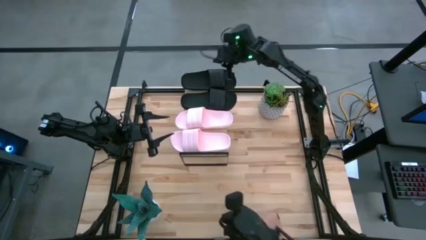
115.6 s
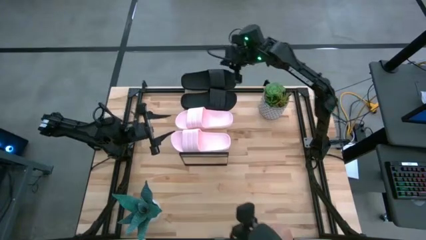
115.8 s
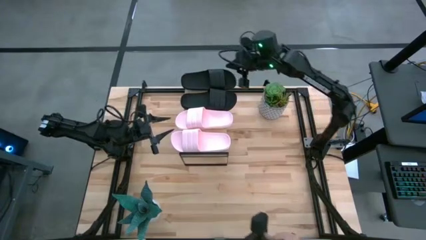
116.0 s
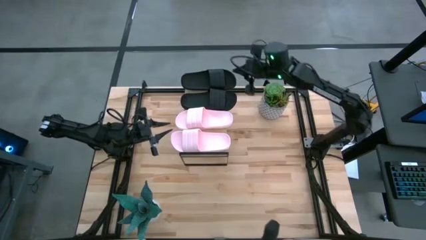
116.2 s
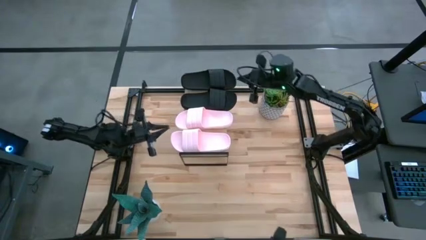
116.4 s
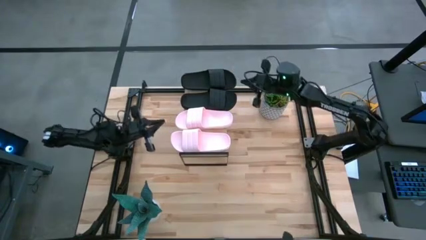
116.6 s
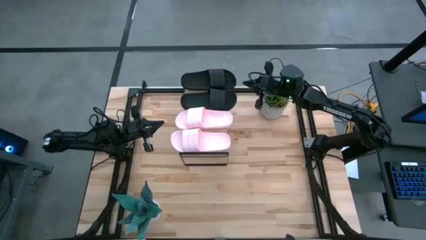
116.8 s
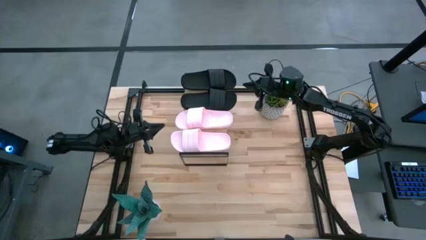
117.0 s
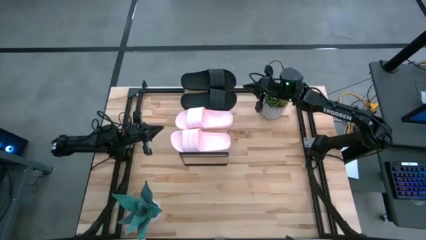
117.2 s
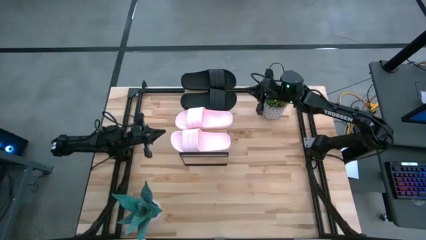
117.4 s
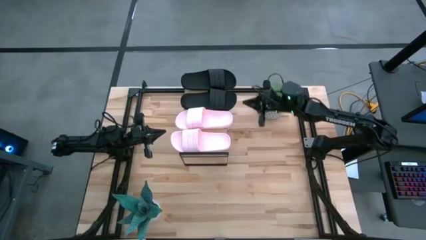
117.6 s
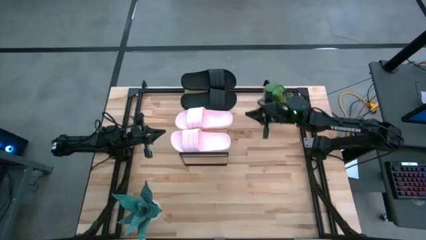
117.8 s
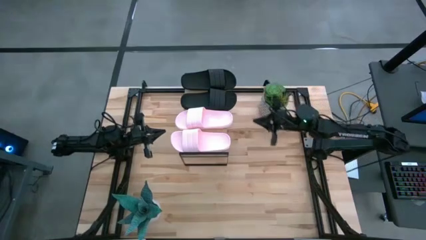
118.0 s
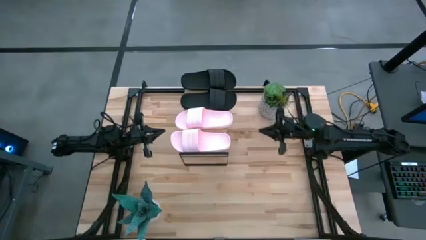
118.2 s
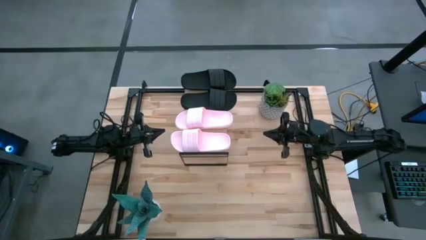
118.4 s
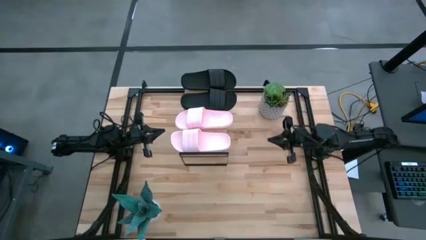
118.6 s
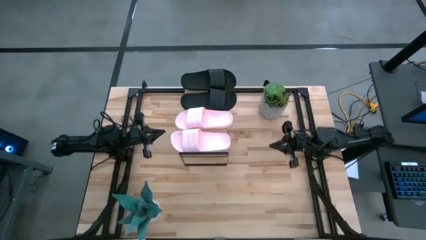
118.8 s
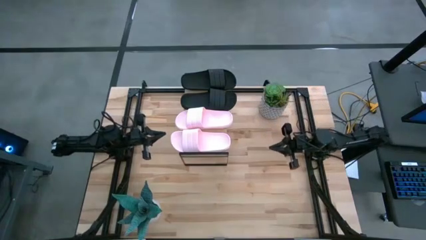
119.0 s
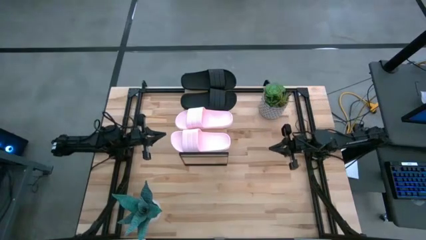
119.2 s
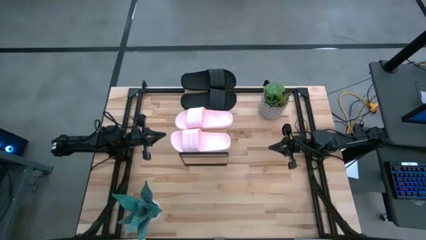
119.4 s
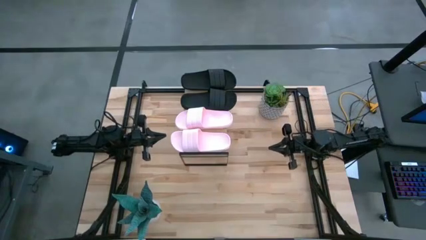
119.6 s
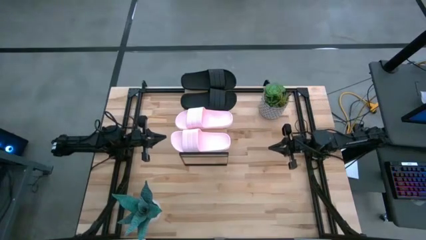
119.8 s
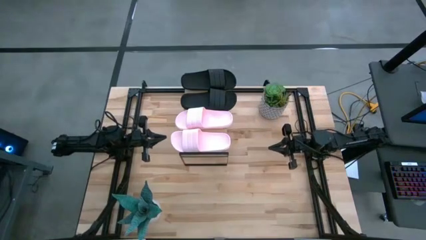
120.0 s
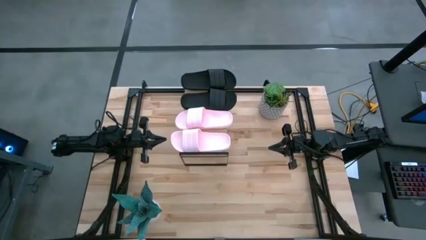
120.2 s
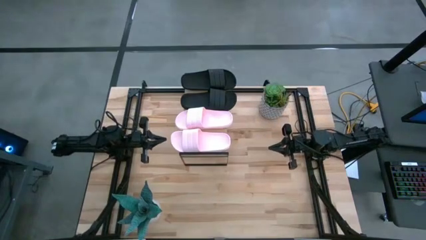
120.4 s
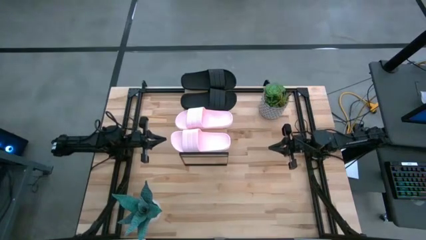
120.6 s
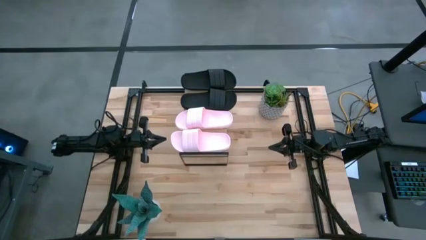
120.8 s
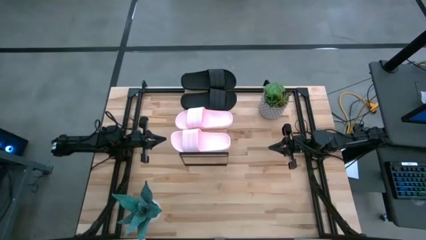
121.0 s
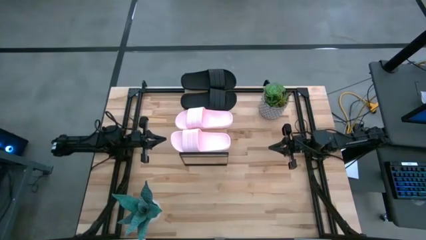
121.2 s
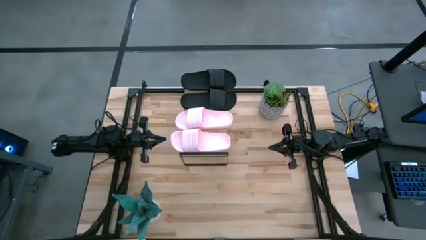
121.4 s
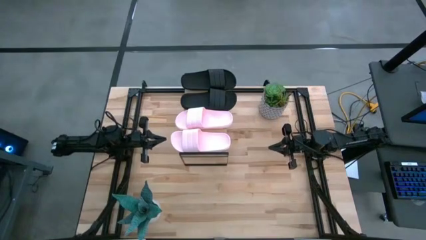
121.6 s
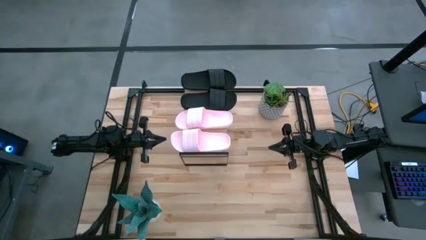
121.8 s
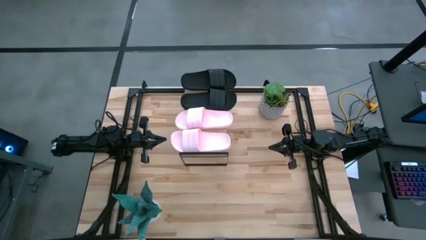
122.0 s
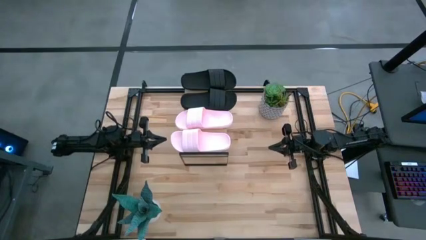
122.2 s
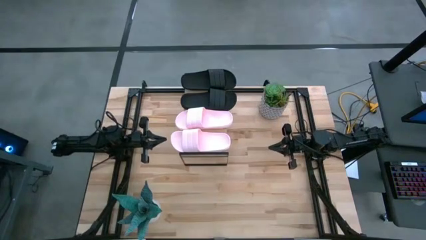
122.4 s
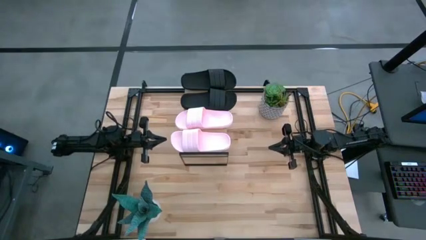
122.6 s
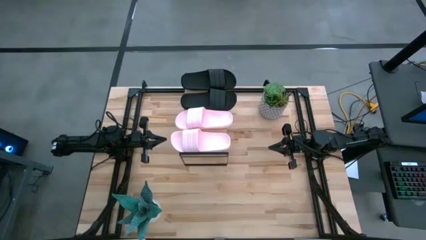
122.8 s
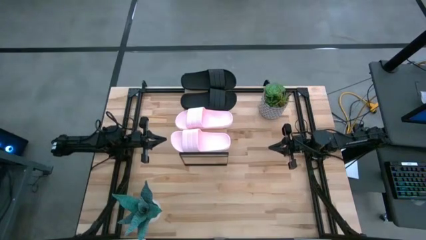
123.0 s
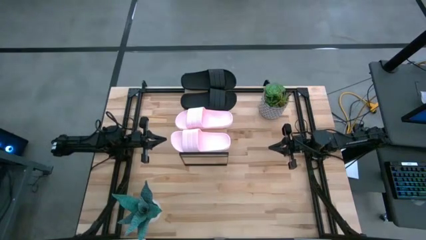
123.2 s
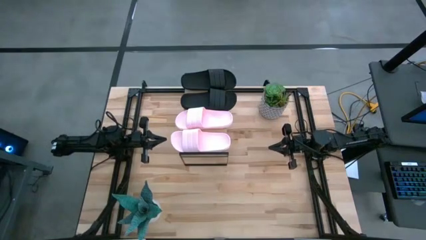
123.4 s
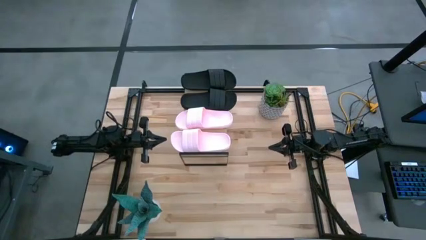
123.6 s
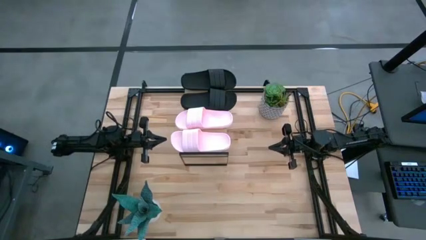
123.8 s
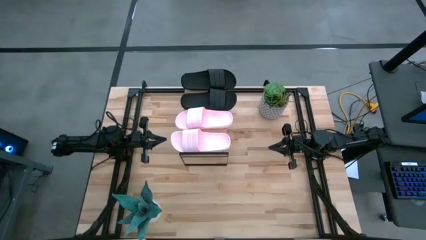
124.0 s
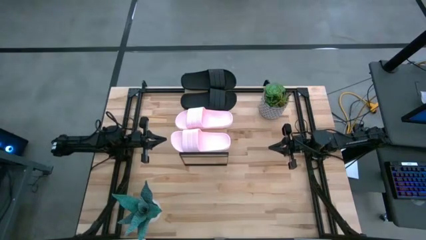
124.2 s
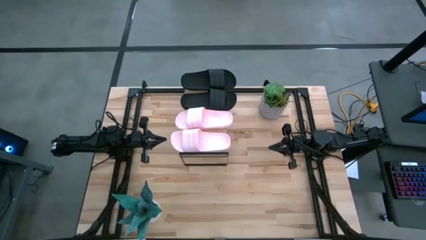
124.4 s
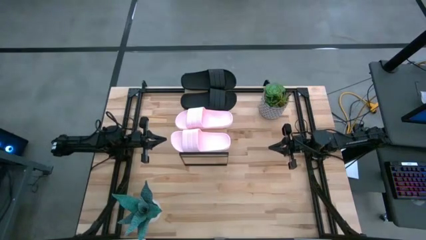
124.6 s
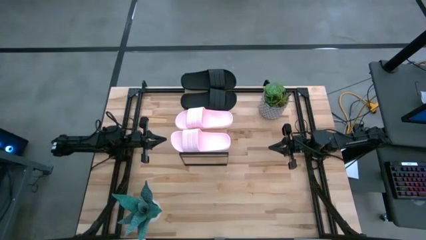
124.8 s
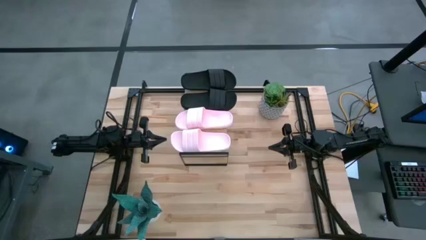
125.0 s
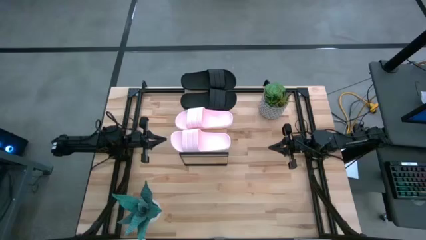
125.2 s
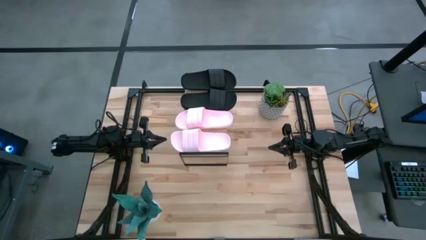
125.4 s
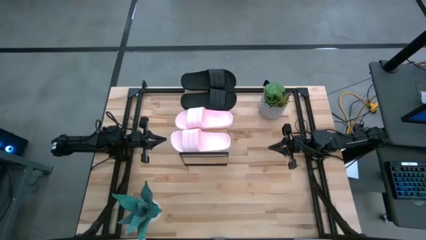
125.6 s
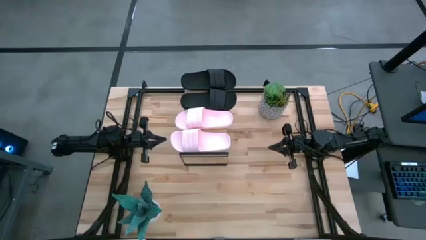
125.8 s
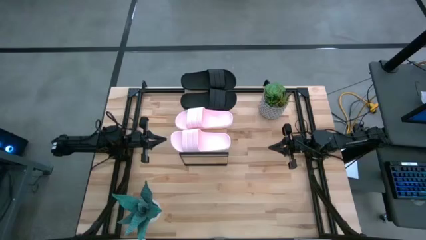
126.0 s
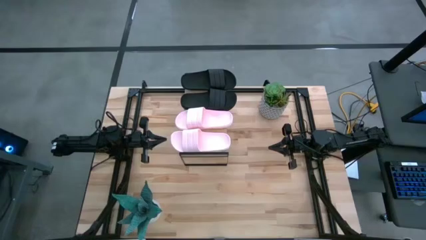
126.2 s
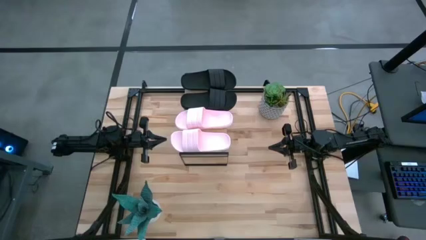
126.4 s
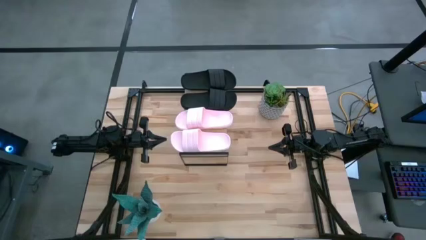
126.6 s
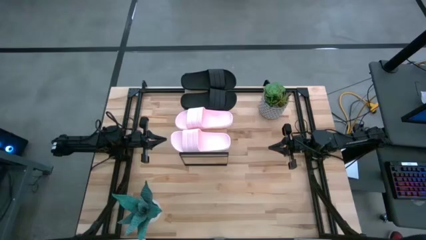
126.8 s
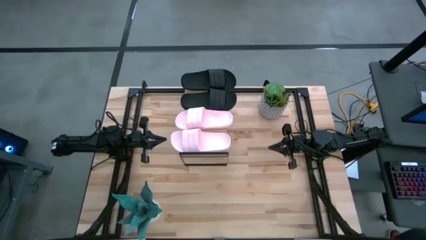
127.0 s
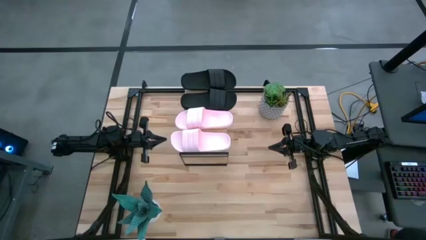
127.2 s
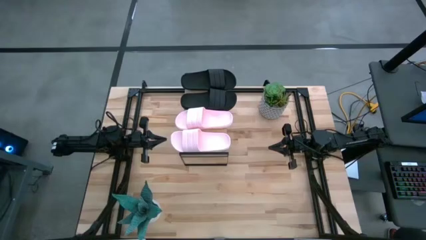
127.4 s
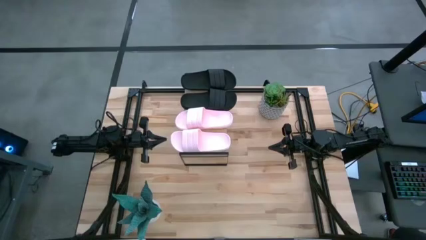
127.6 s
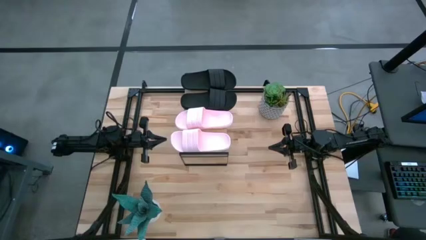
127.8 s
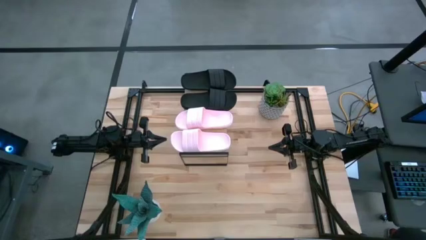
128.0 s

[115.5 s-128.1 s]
Task: Pick and place slides into the shelf
Return to Home Position

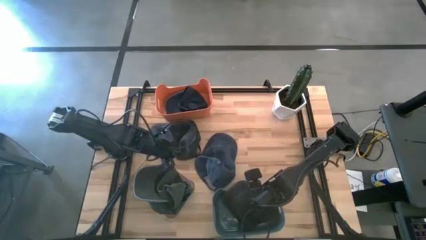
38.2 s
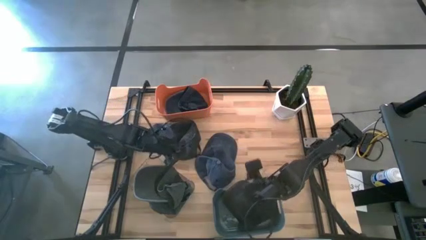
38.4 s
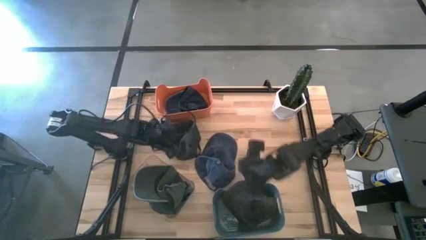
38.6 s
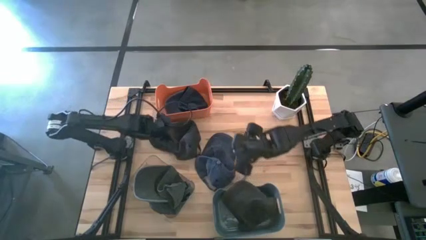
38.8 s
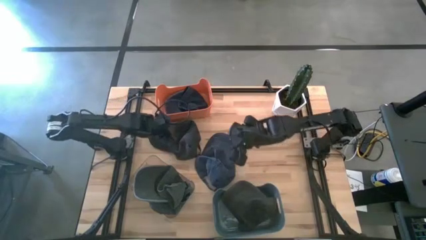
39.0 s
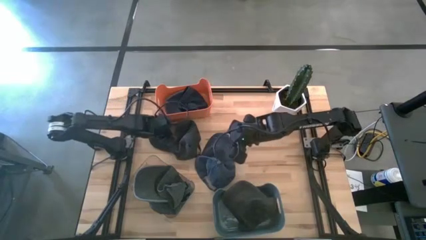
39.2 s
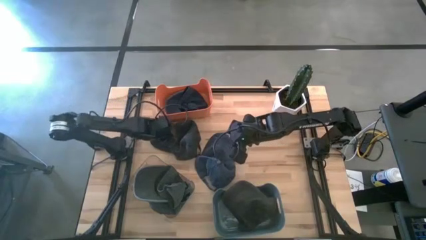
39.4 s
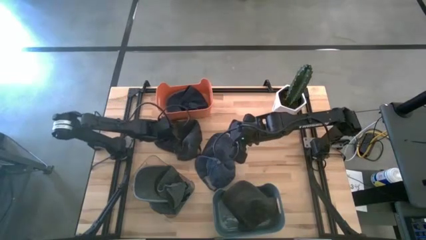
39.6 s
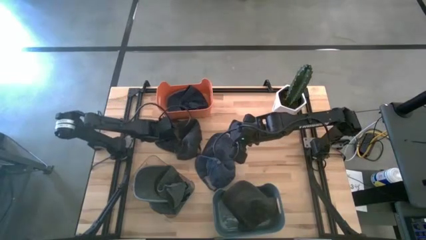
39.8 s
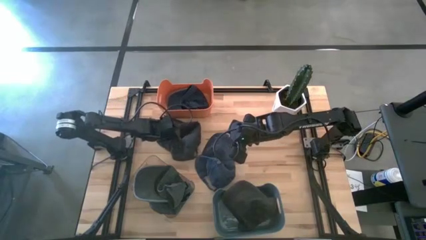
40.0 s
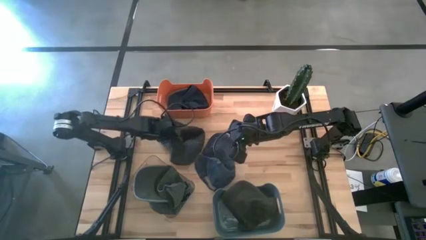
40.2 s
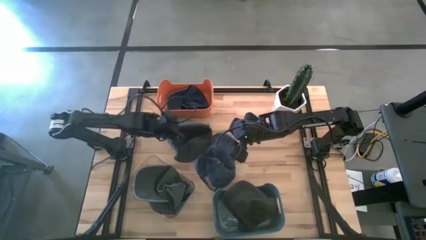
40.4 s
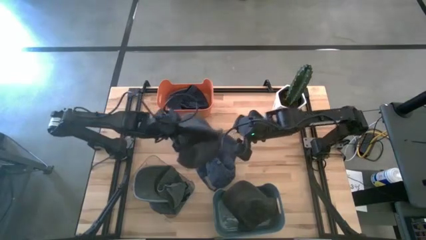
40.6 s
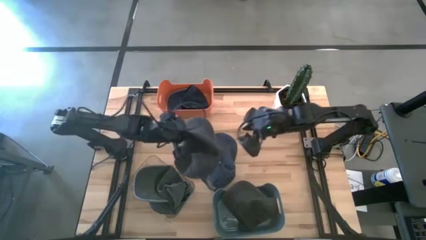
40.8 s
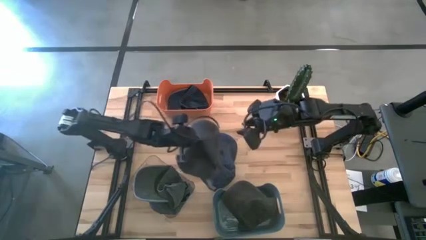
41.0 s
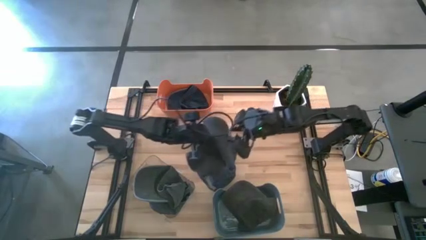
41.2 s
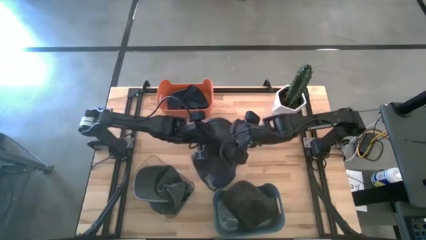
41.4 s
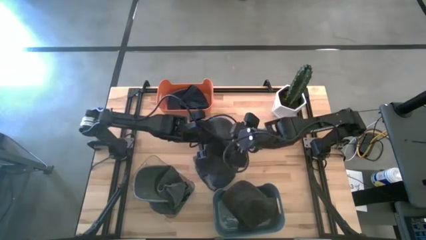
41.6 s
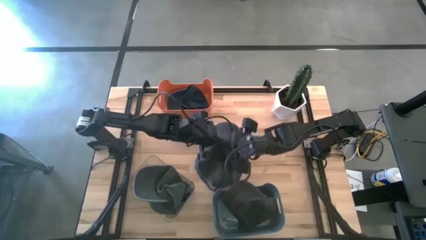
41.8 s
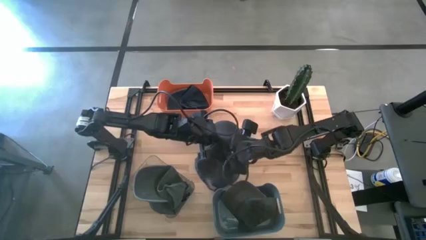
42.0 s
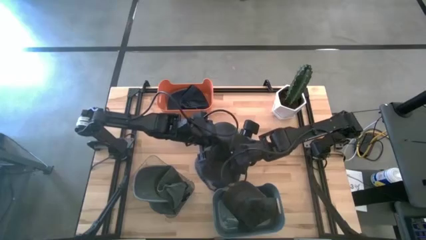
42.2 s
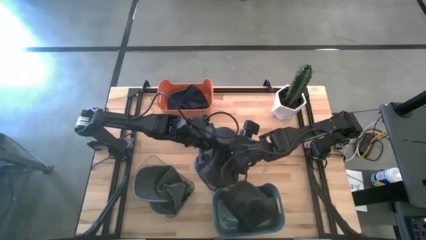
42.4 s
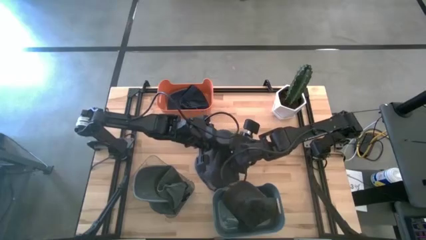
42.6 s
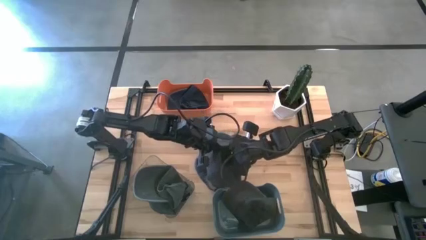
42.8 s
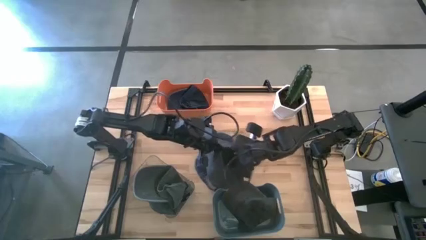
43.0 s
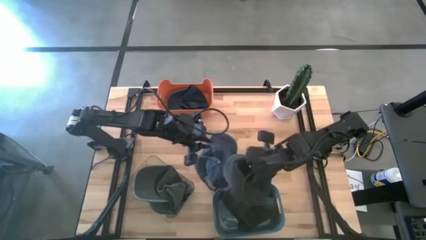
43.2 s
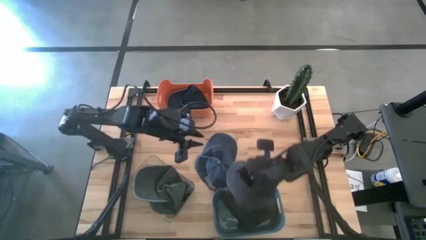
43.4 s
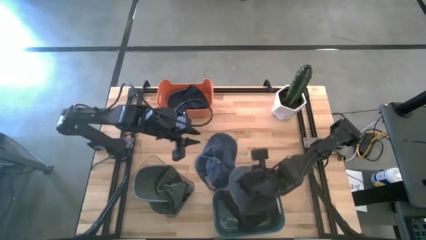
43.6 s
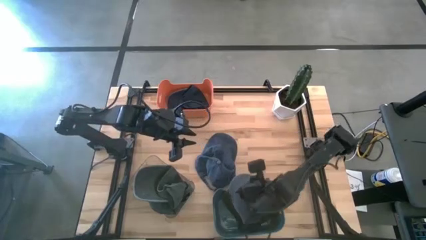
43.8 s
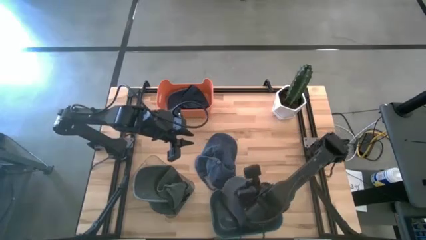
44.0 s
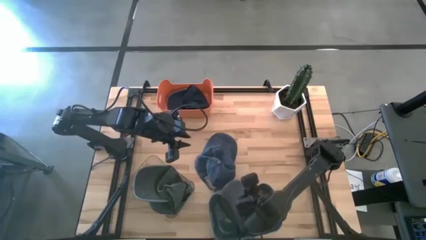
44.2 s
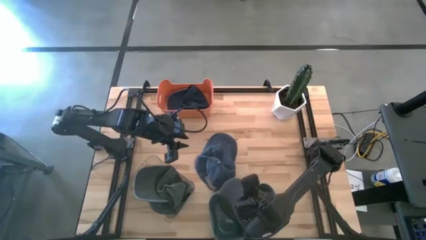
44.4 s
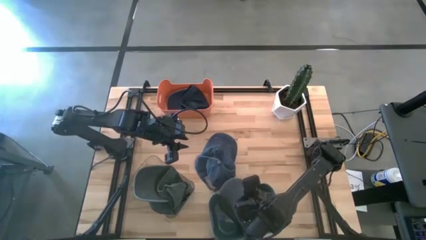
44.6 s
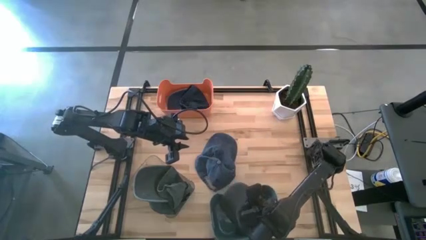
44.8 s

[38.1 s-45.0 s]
Task: Pick & Place hat
Put the black cap into the blue bin
